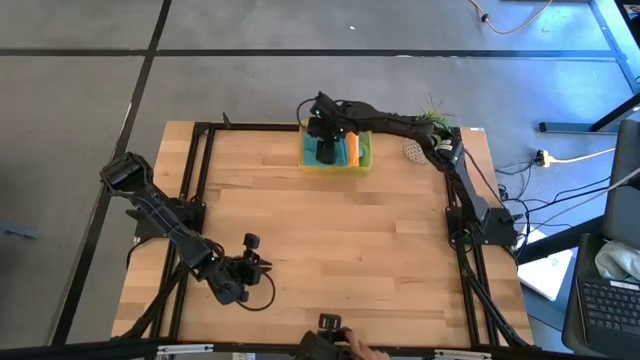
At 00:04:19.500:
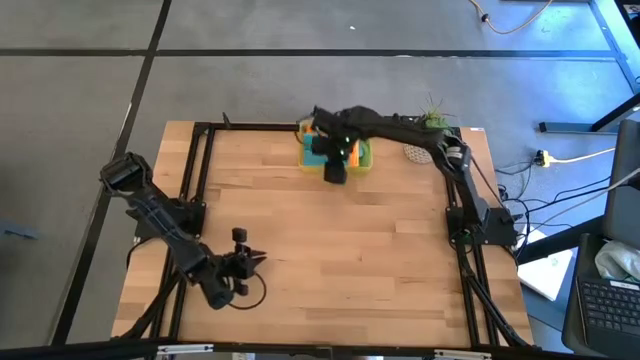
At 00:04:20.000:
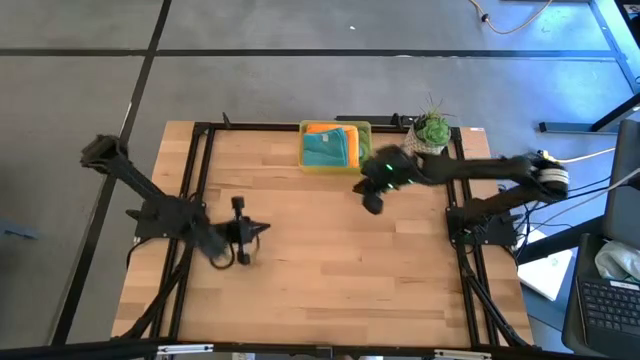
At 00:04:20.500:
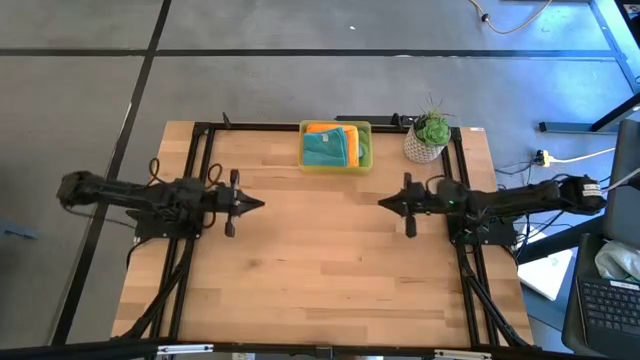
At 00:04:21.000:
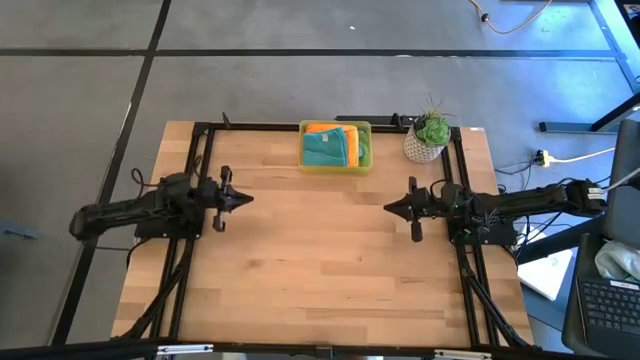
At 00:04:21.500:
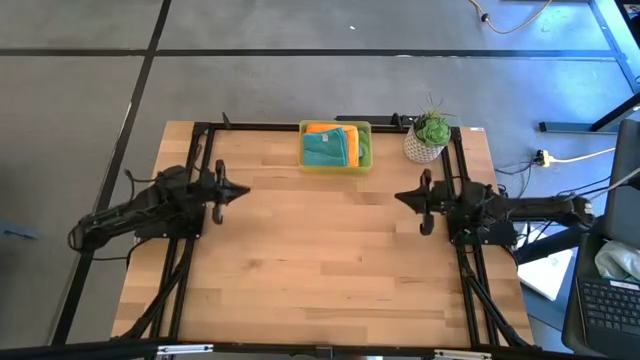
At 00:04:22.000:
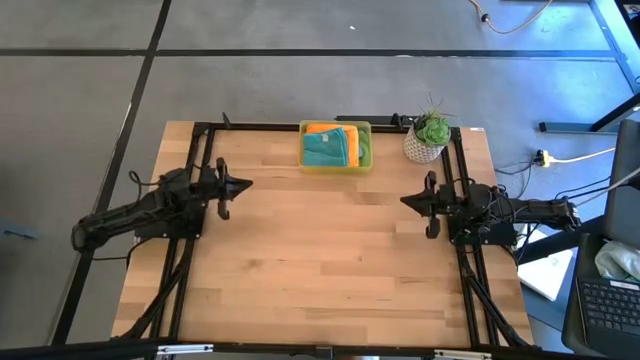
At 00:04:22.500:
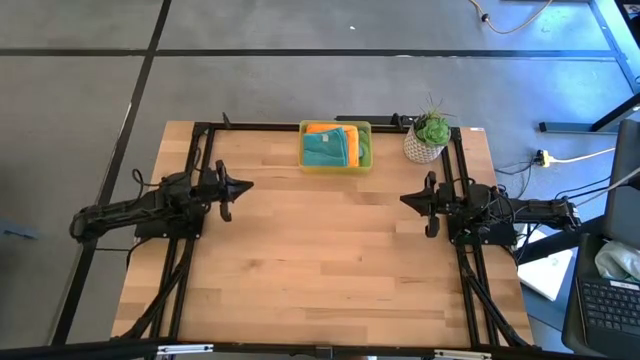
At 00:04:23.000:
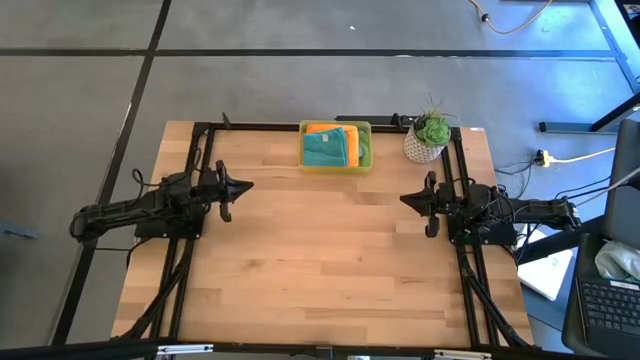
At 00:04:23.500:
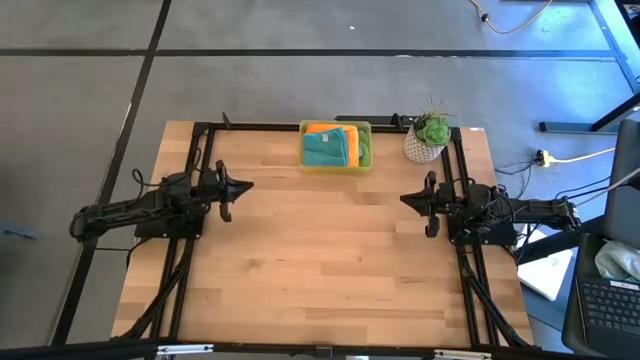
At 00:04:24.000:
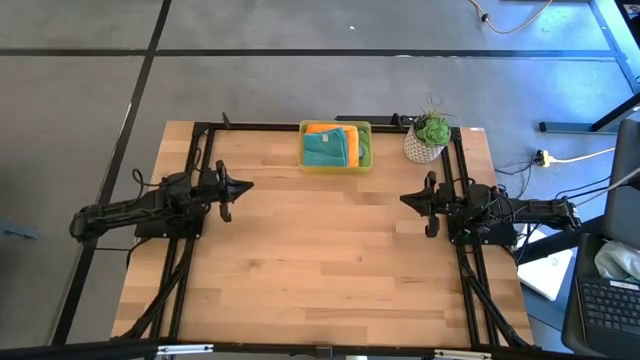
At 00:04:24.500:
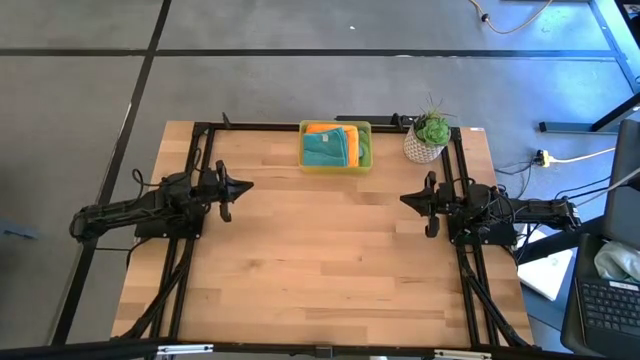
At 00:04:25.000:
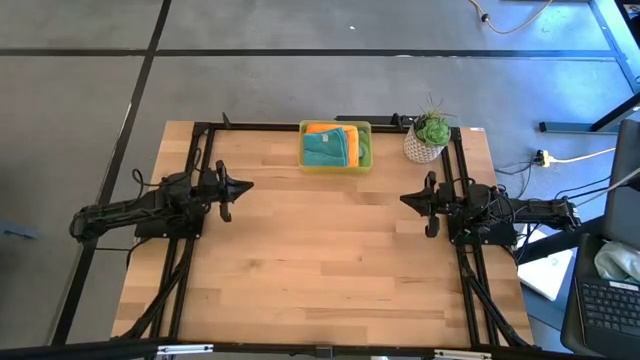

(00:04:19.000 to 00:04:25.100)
Task: Fold microfiber towels
Return to Home Position

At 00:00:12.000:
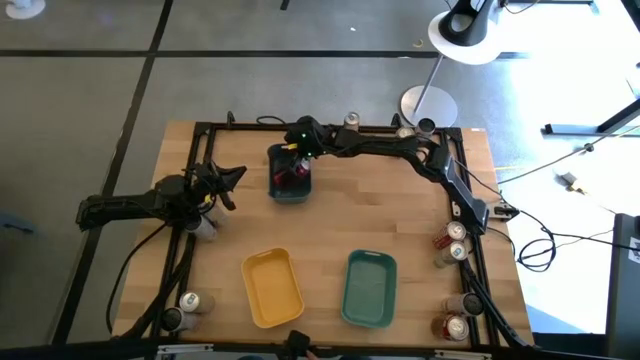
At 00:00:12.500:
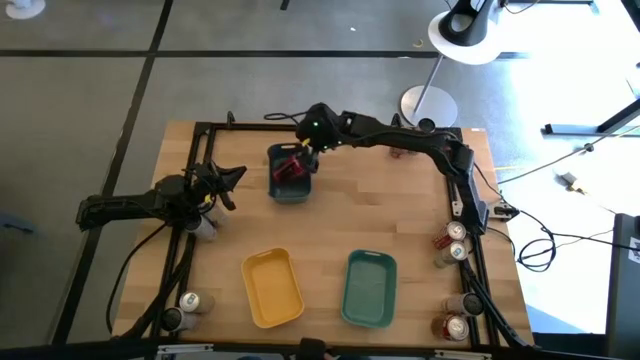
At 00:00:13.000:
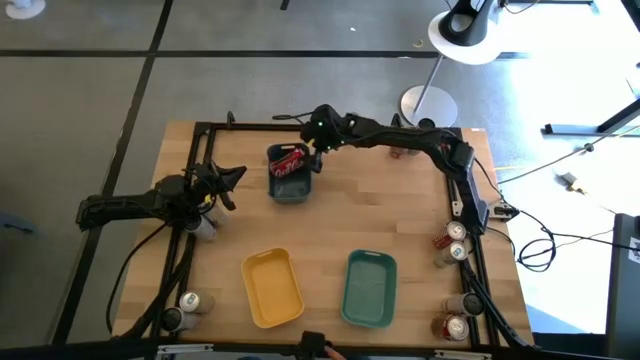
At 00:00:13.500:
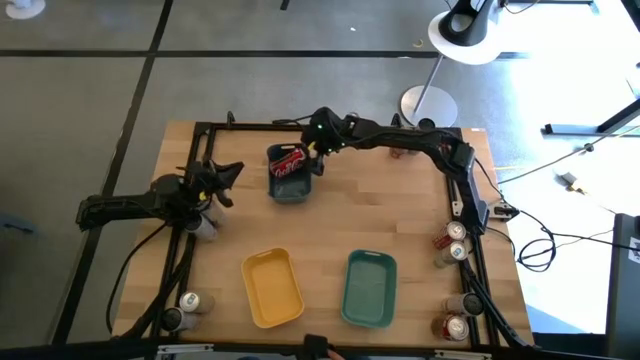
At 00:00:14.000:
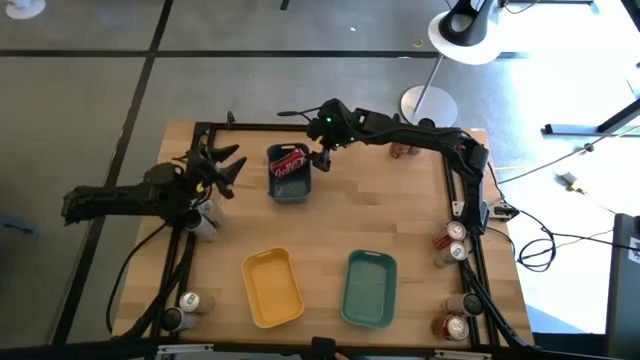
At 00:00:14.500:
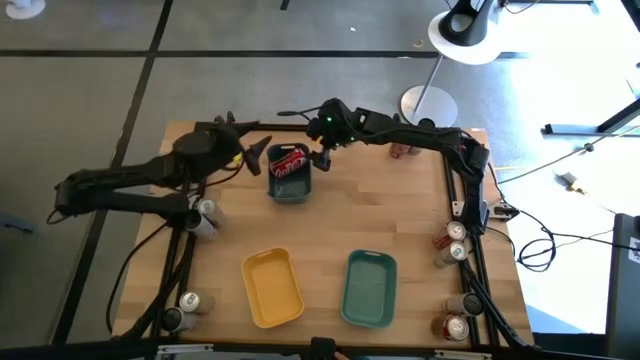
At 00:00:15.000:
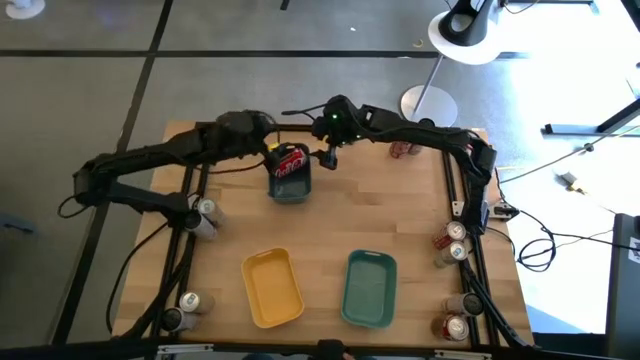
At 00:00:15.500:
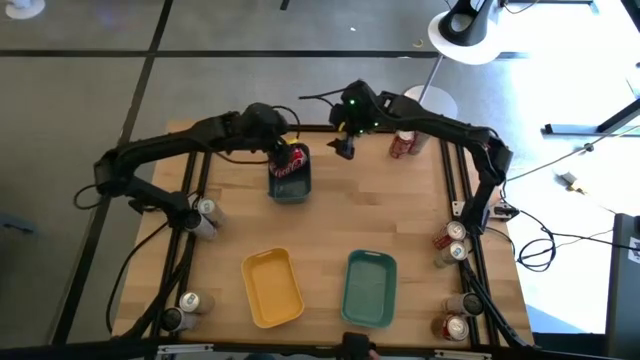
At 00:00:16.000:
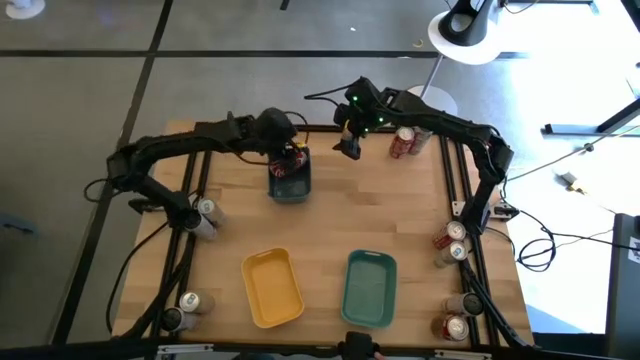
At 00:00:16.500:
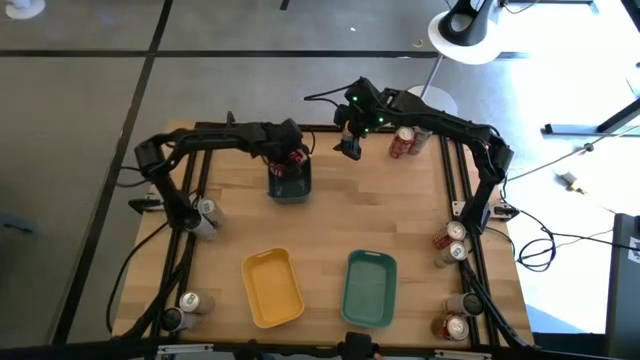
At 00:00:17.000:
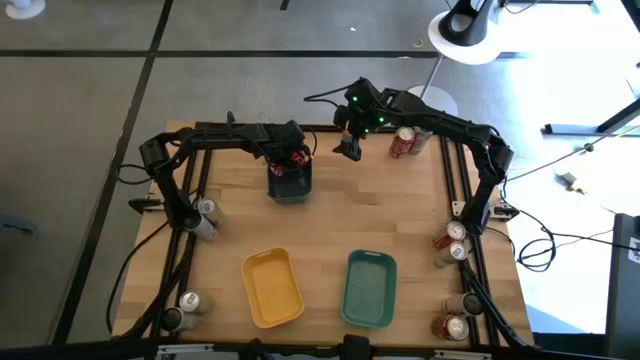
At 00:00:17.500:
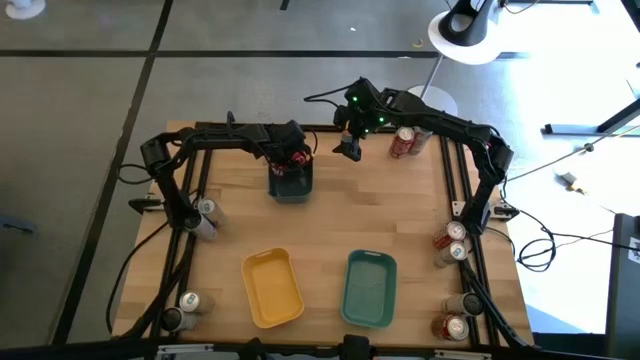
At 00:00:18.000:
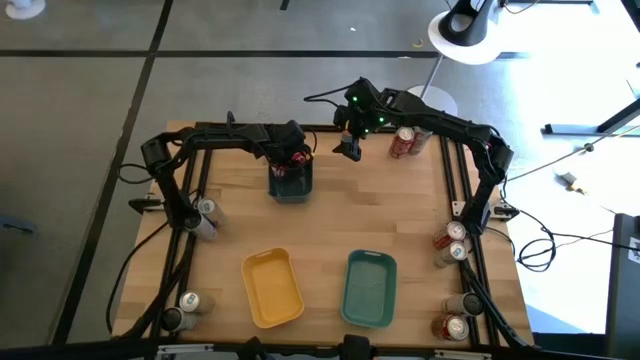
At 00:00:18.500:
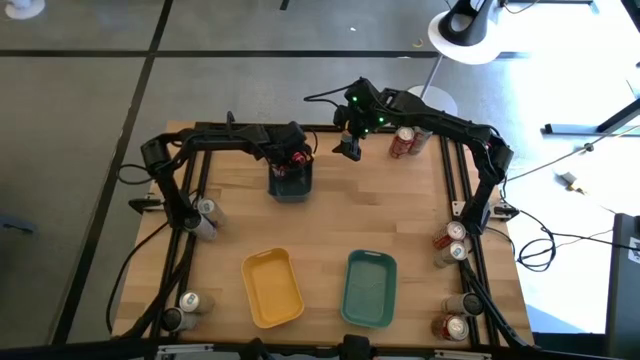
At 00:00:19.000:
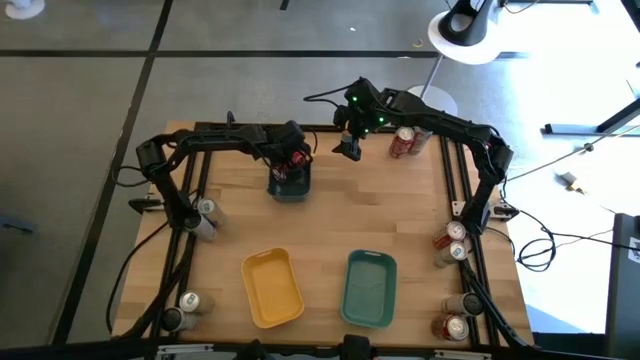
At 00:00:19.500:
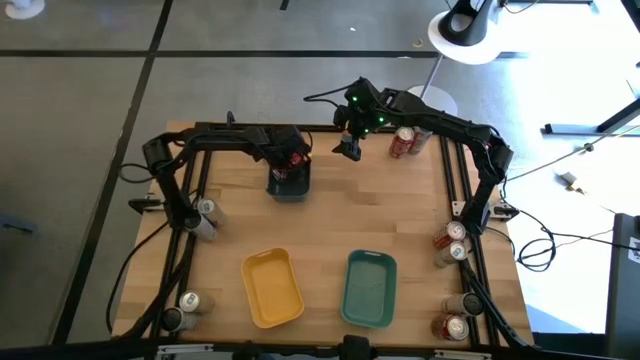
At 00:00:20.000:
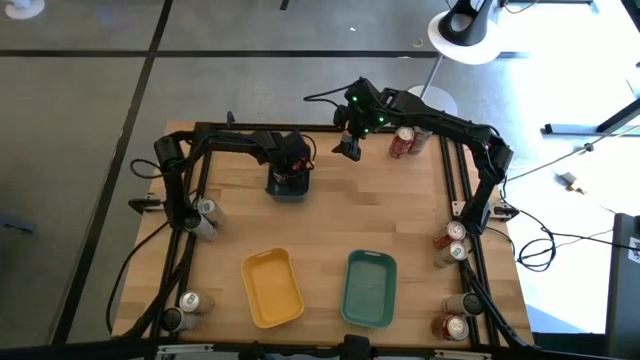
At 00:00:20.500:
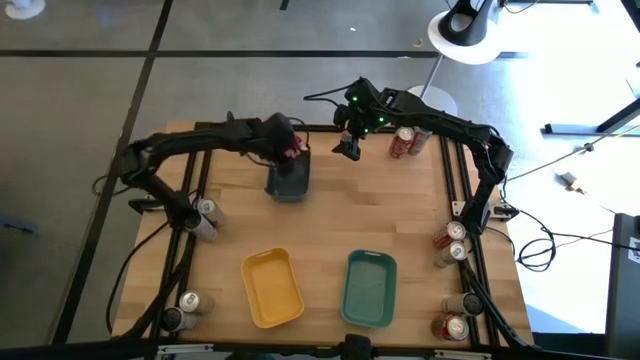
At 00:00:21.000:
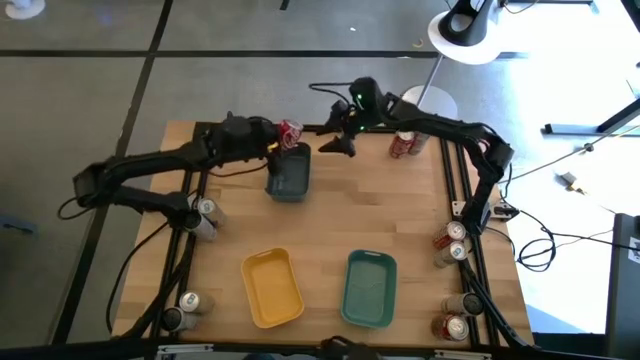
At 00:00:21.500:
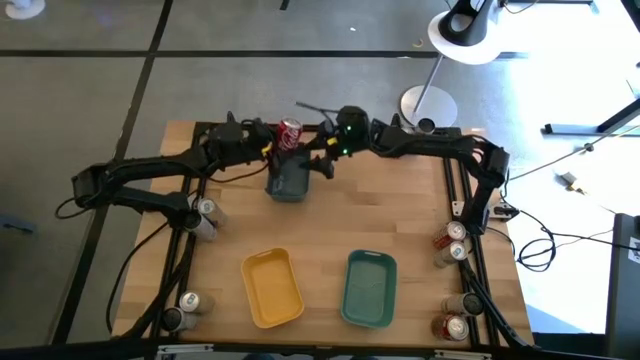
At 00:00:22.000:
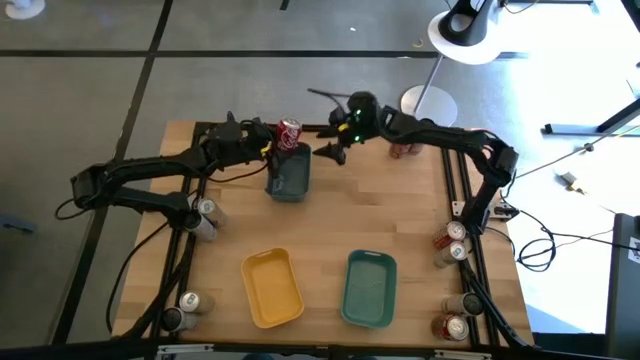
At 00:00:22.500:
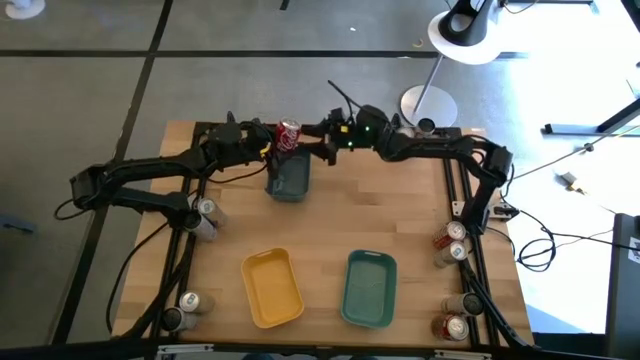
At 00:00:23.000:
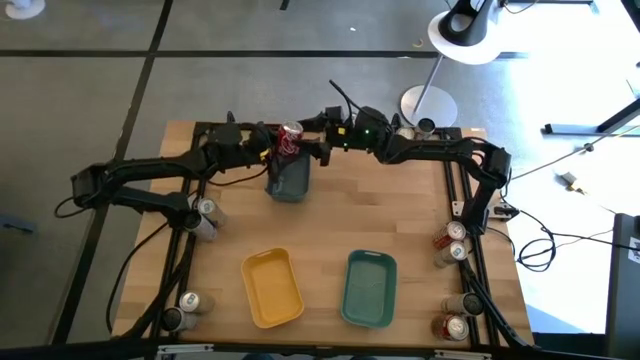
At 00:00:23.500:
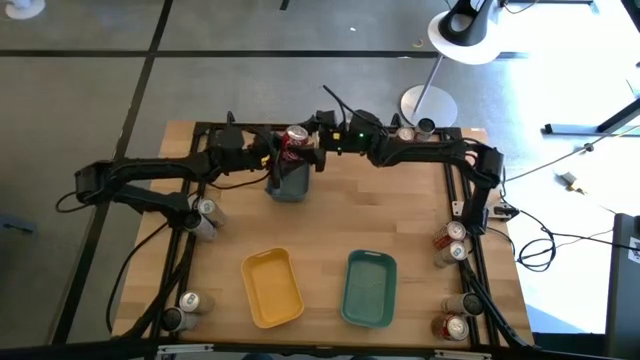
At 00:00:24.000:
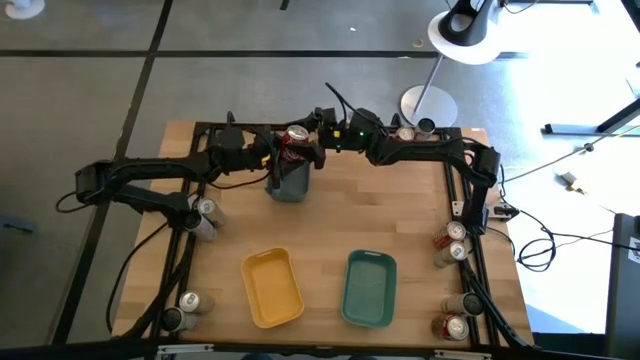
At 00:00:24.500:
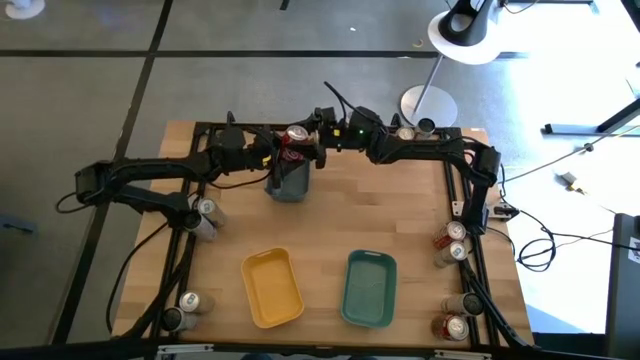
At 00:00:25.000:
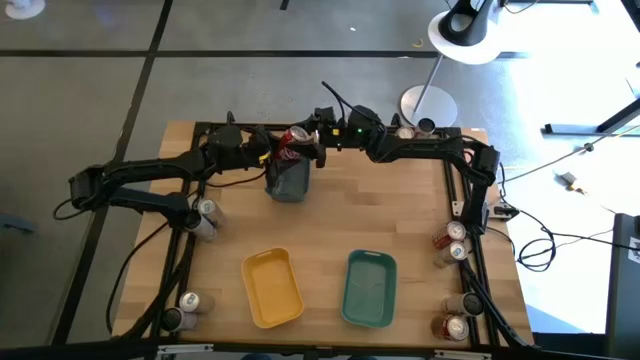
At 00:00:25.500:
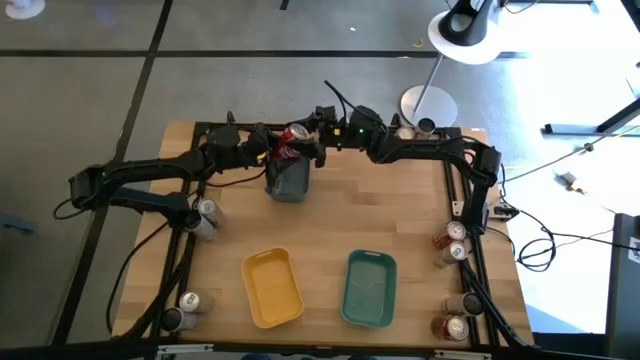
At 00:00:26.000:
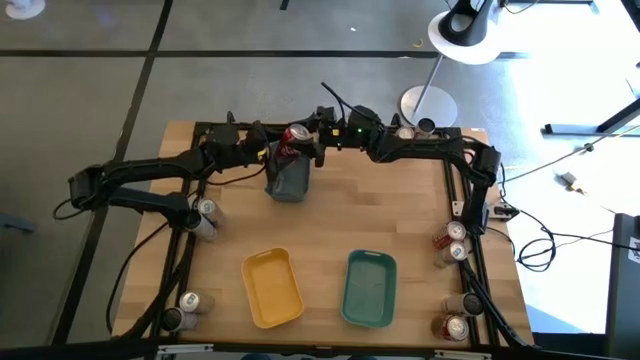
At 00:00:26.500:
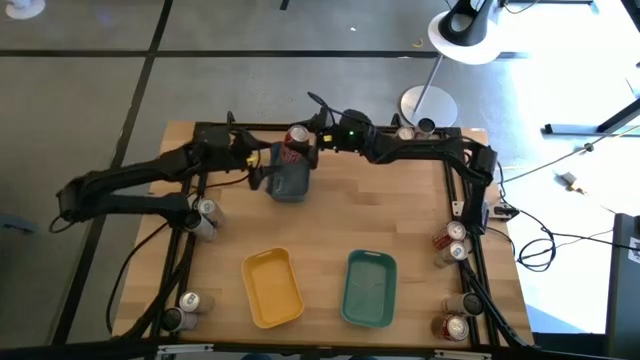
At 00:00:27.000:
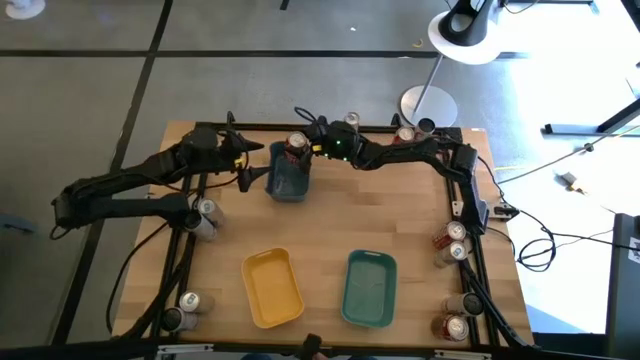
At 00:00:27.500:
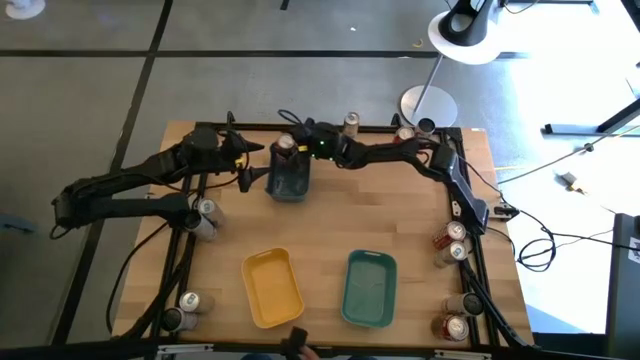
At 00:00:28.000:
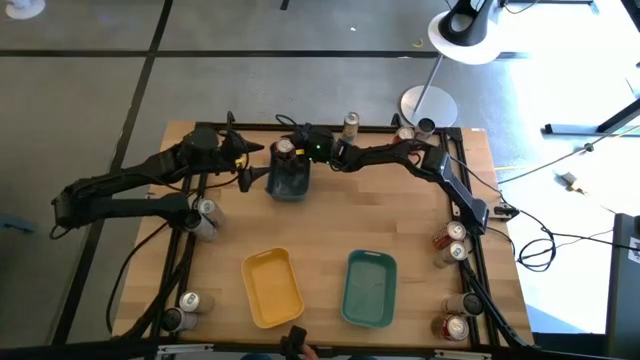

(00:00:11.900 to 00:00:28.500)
Task: Sort soda cans
Put the red and white soda can into the blue bin
